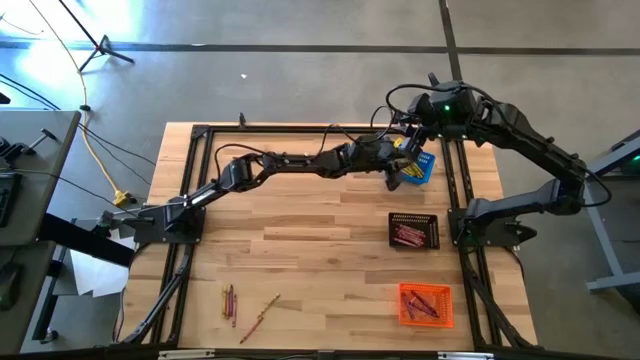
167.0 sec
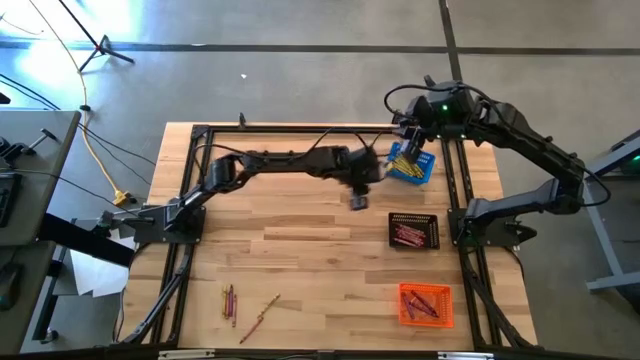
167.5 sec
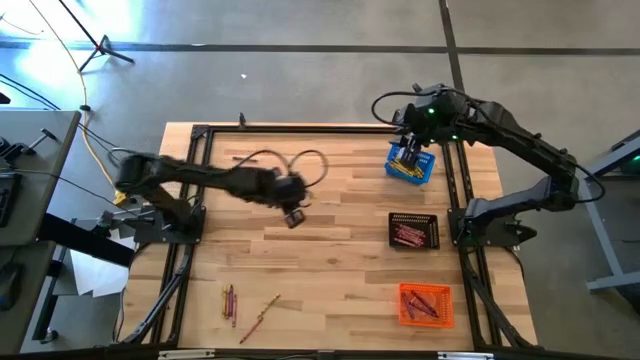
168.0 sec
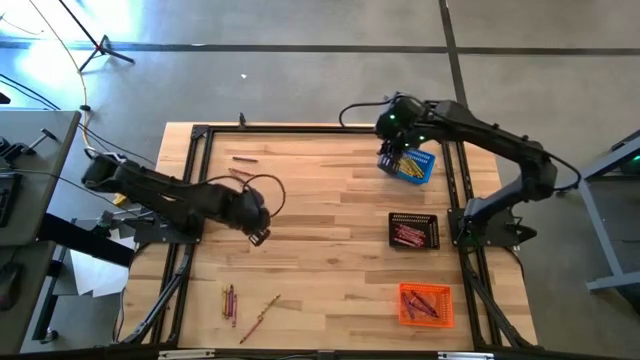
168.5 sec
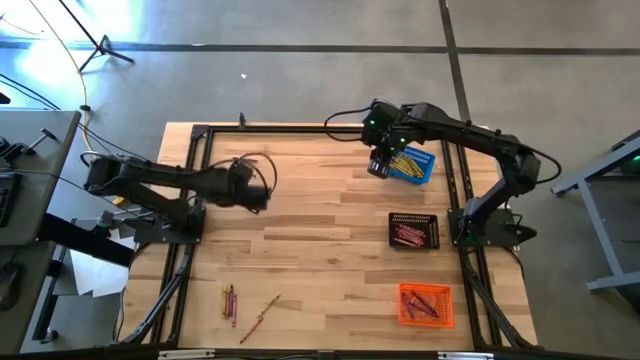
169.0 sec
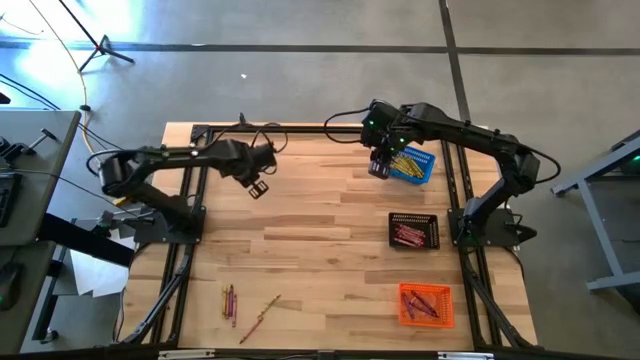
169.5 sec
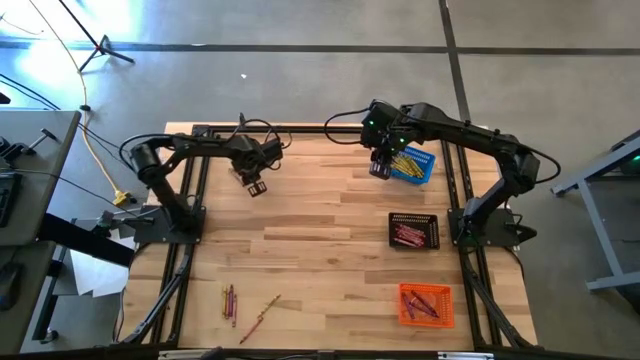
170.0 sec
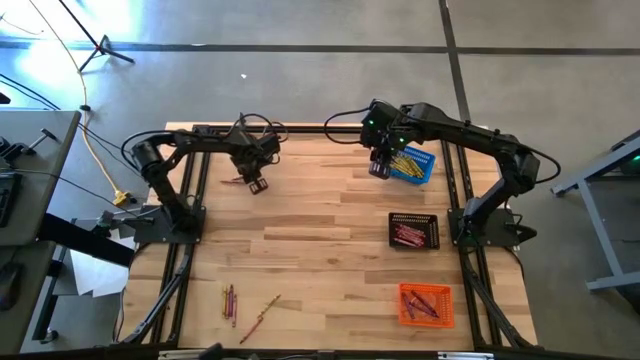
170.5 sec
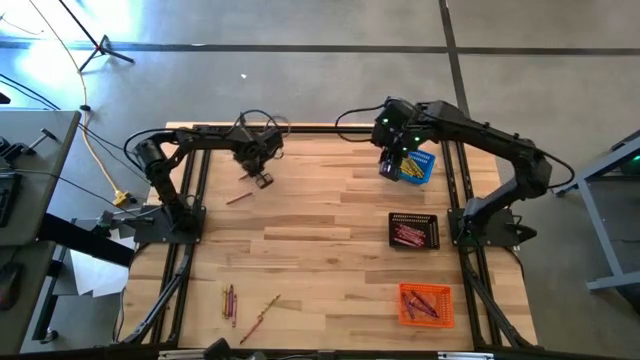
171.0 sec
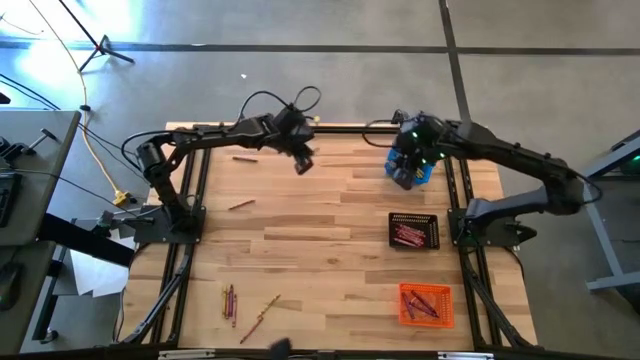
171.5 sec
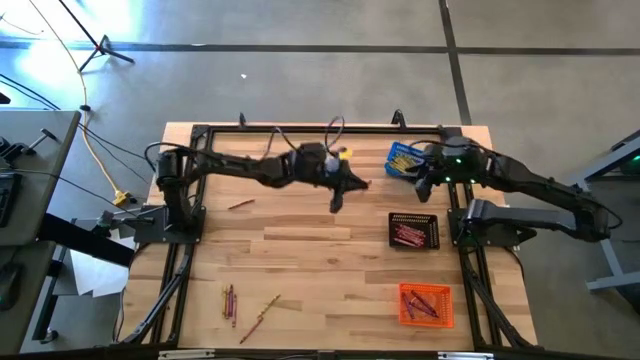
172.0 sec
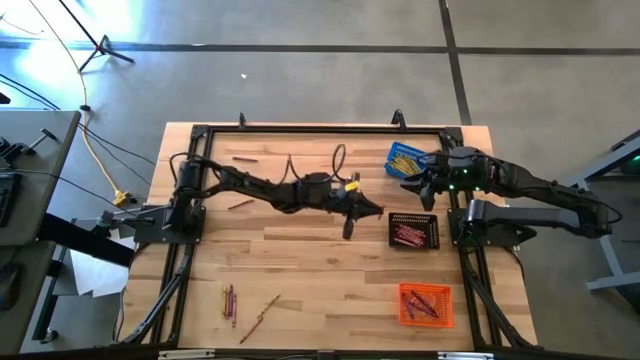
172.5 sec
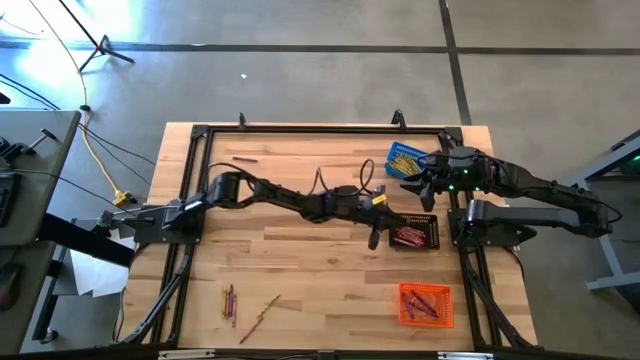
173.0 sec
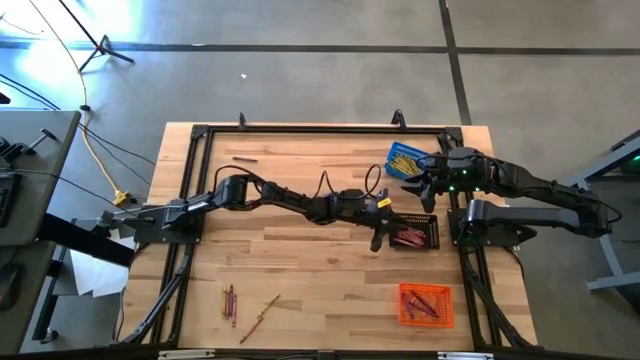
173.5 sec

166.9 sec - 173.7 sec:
Task: Sort crayons
Put the red crayon into the black bin

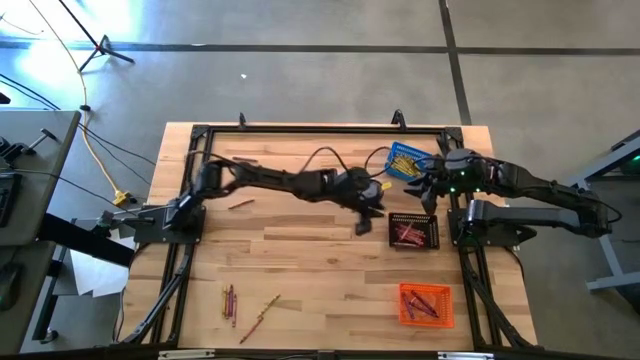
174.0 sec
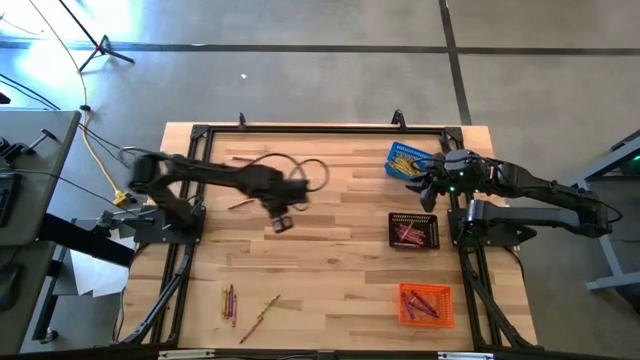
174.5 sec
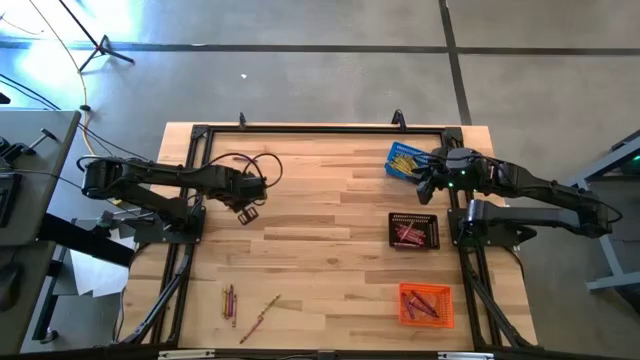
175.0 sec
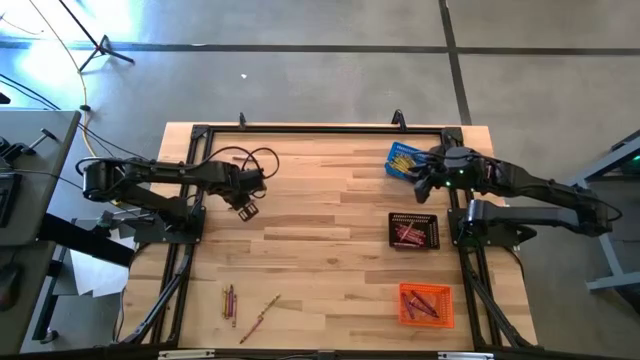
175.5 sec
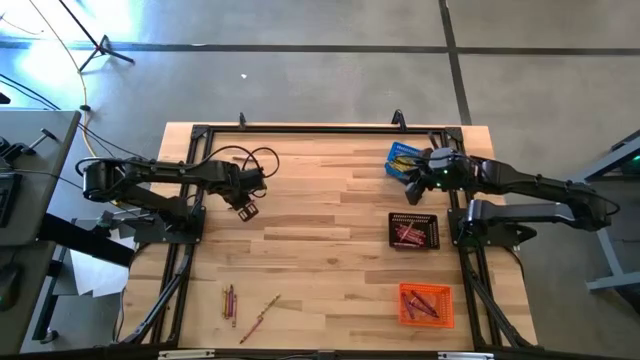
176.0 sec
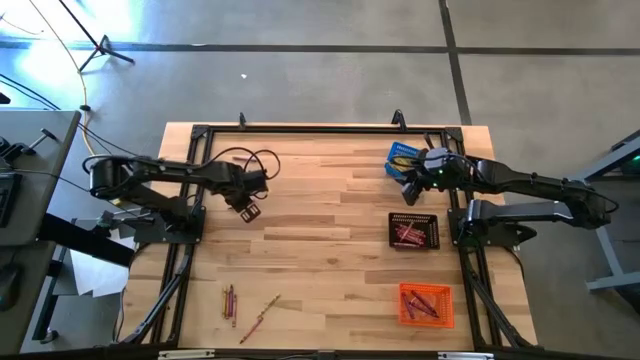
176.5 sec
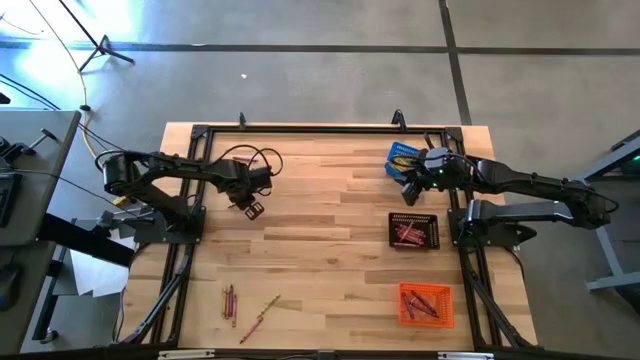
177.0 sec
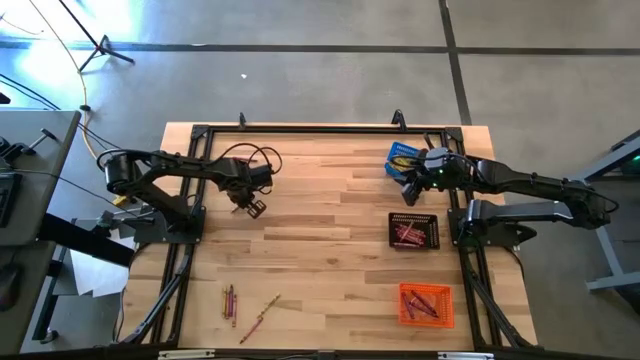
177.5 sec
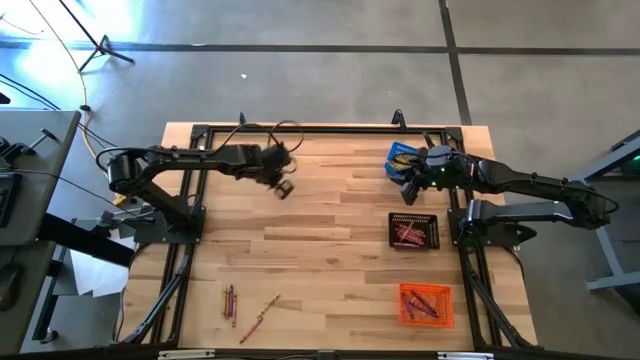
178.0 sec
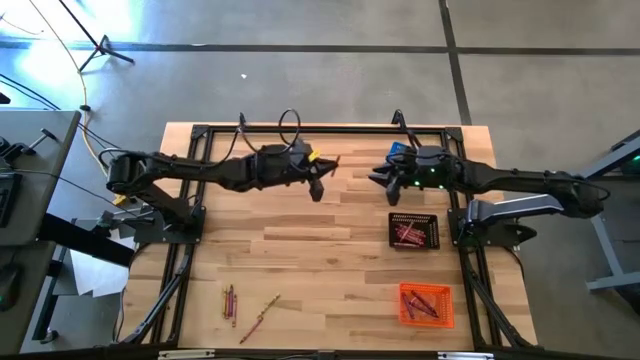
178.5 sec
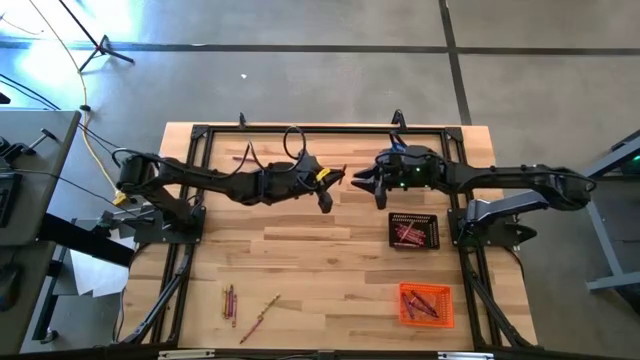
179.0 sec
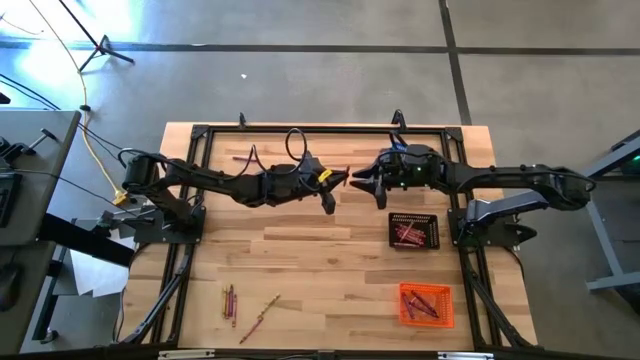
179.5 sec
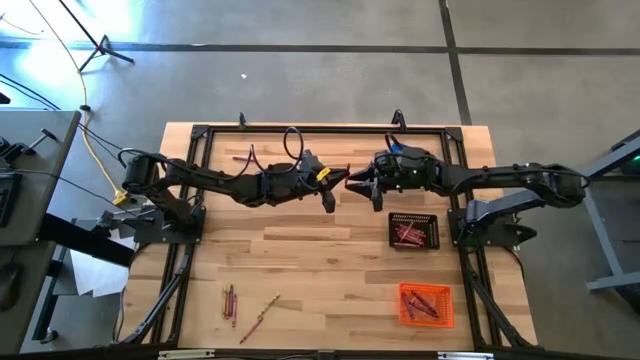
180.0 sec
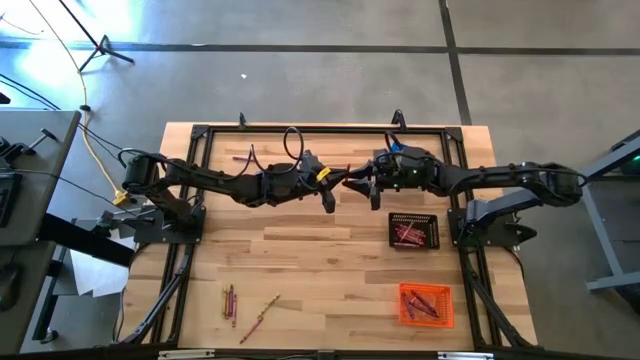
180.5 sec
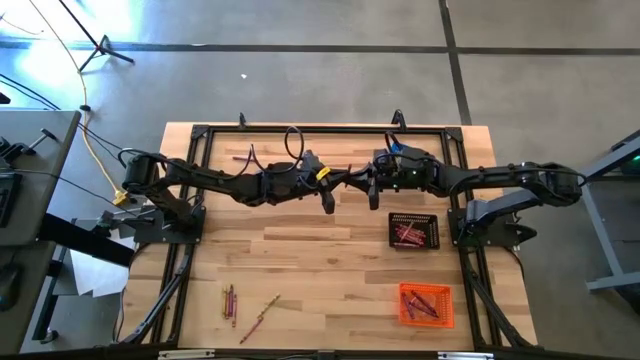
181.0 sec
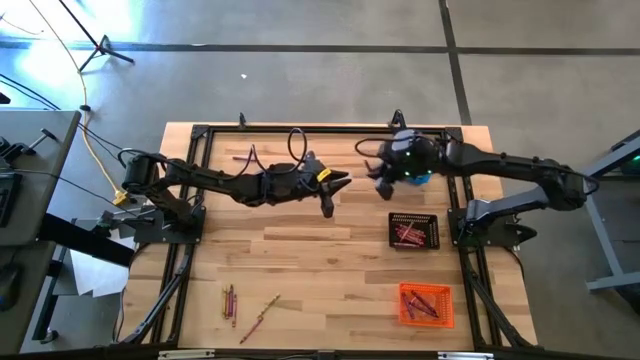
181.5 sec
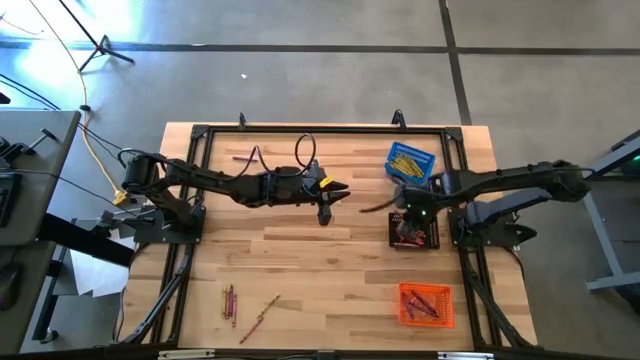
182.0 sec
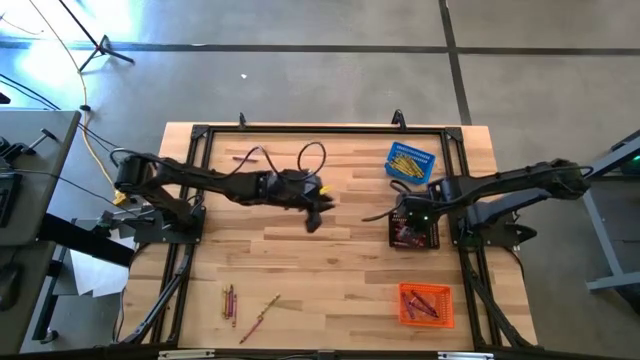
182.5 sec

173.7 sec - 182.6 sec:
Put the red crayon into the black bin

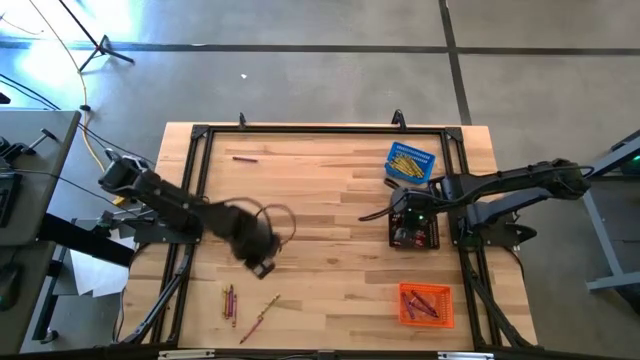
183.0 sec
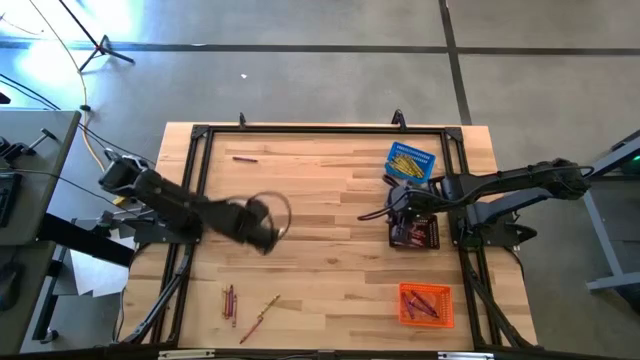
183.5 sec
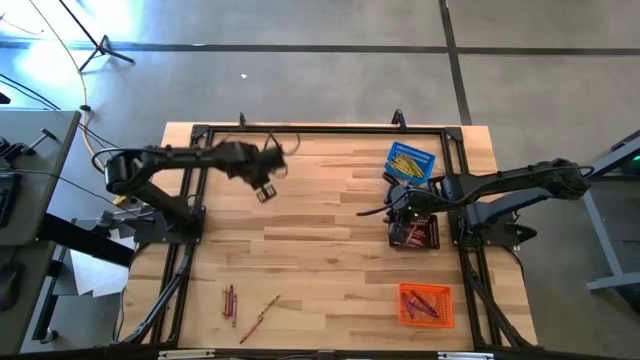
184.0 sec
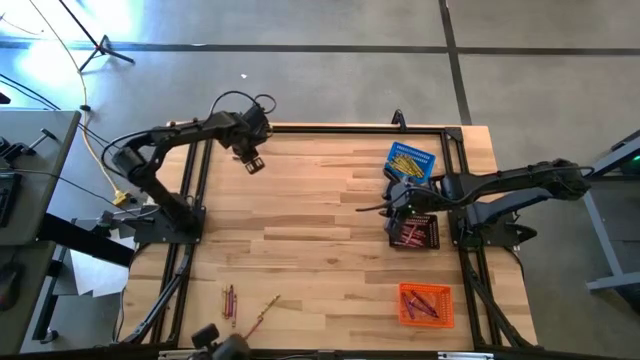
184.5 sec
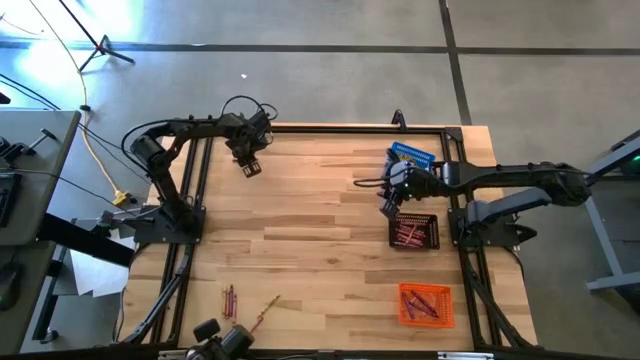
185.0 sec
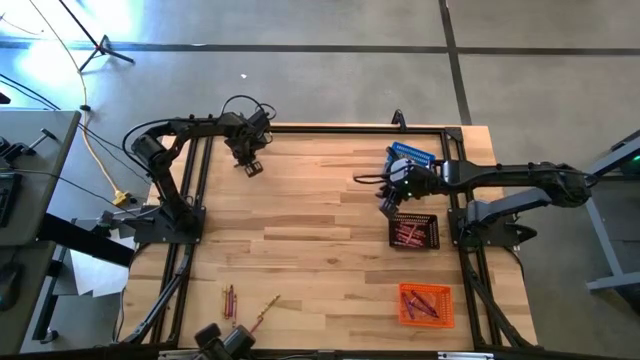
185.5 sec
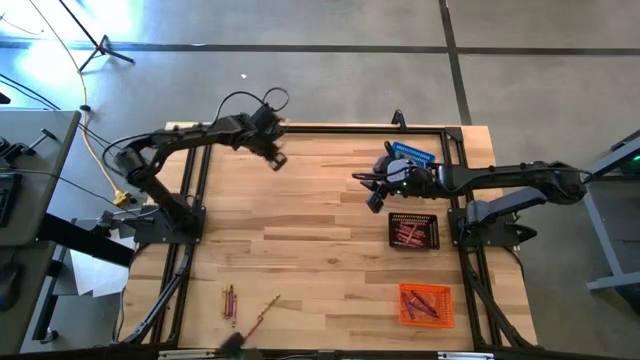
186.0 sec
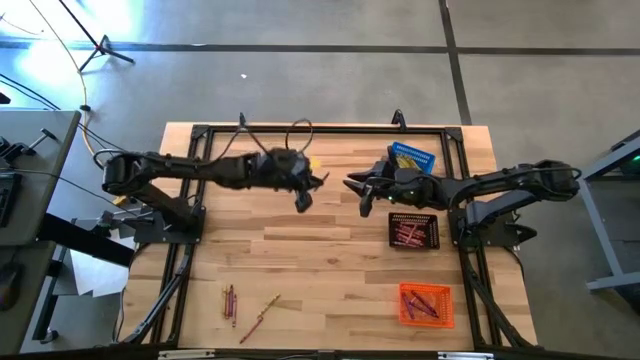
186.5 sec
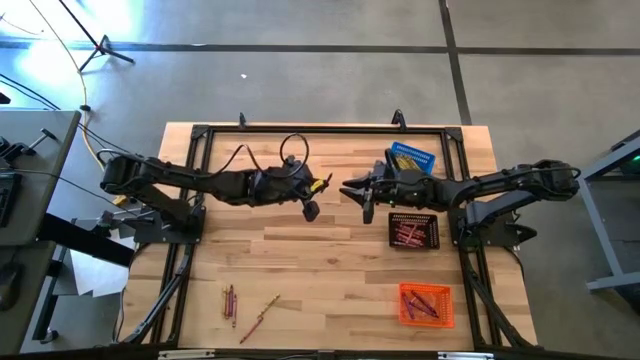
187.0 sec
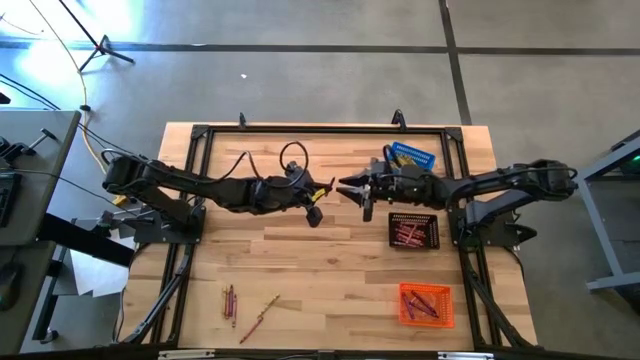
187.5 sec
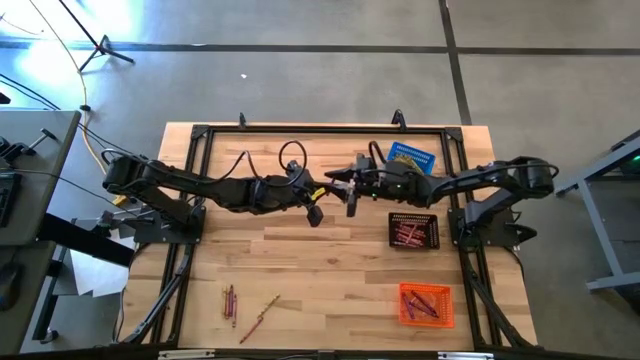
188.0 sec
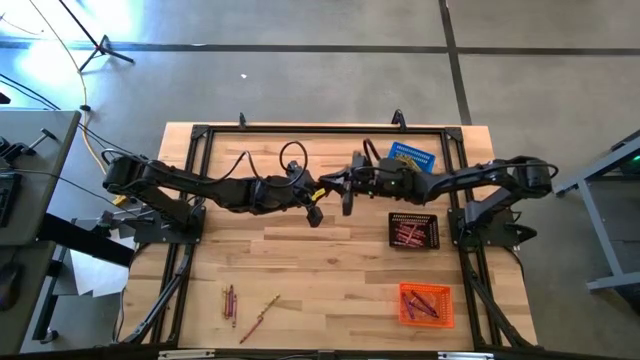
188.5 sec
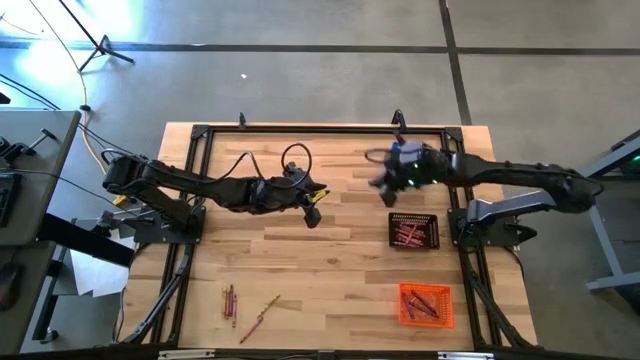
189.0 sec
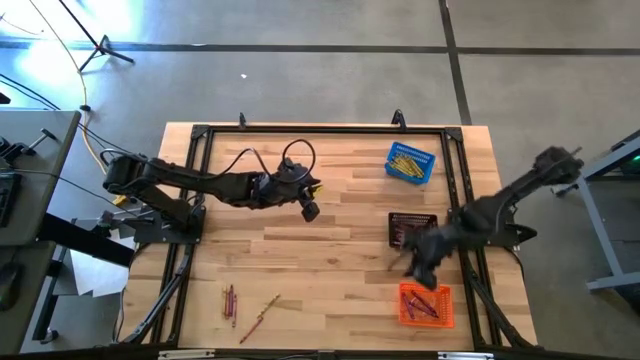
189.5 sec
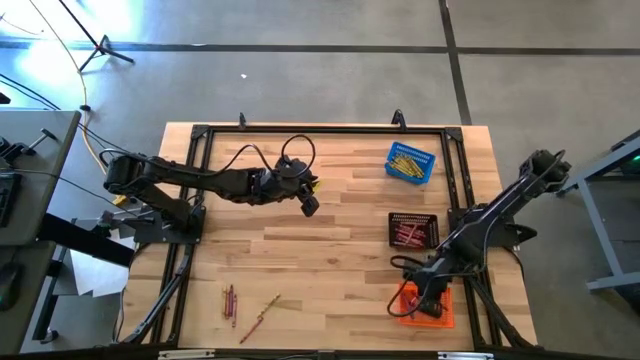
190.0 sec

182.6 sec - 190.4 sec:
Put the violet crayon into the orange bin
